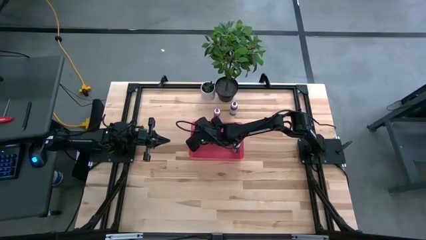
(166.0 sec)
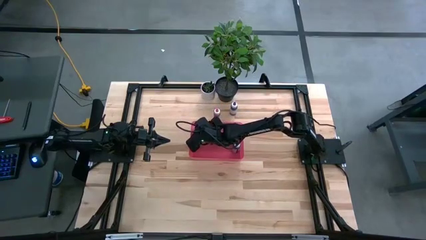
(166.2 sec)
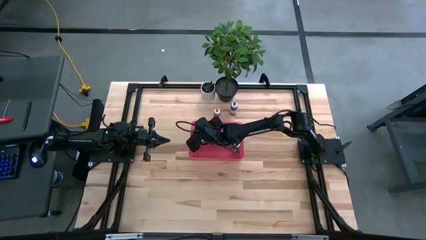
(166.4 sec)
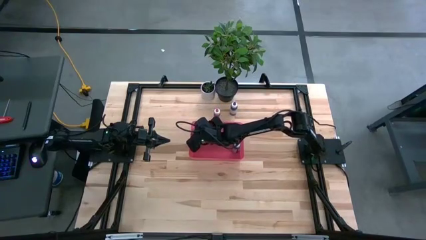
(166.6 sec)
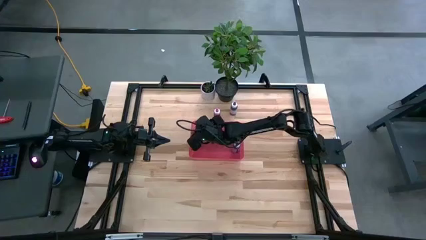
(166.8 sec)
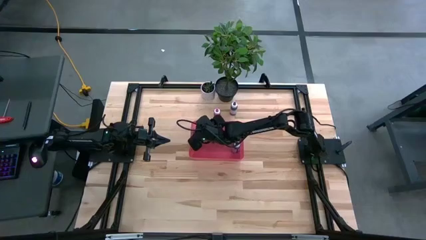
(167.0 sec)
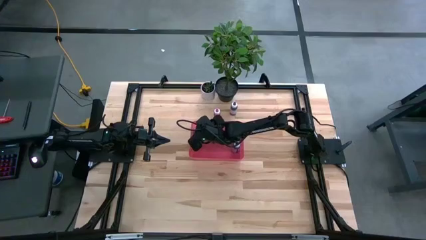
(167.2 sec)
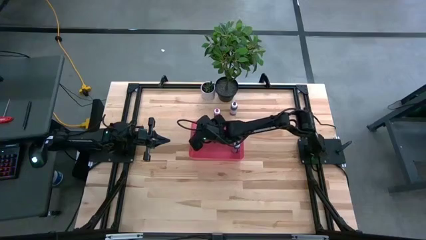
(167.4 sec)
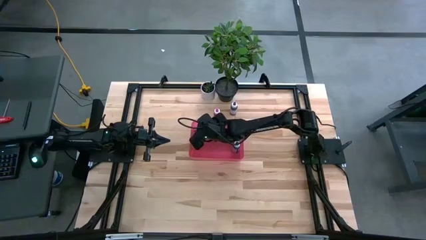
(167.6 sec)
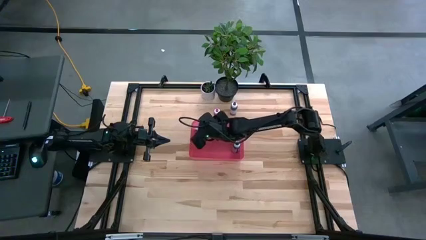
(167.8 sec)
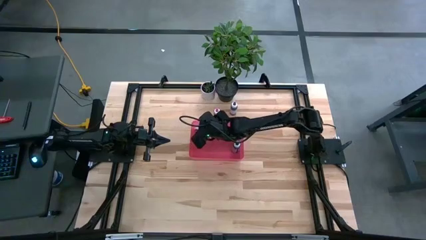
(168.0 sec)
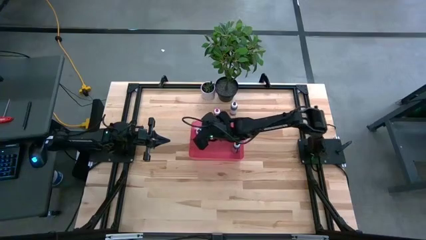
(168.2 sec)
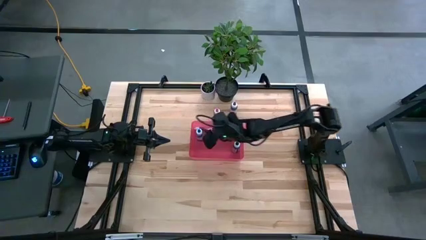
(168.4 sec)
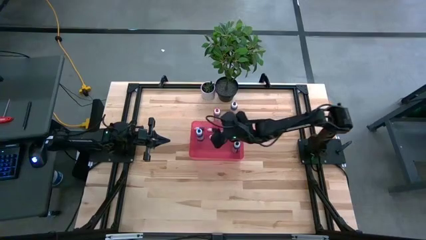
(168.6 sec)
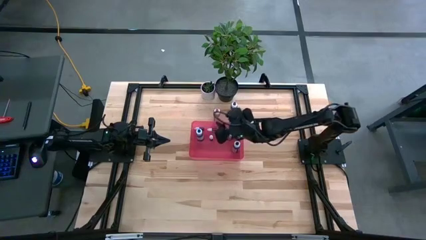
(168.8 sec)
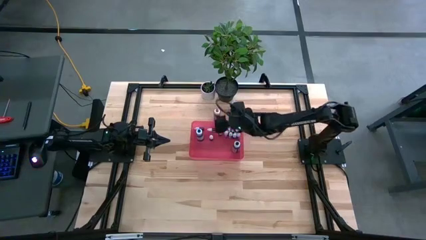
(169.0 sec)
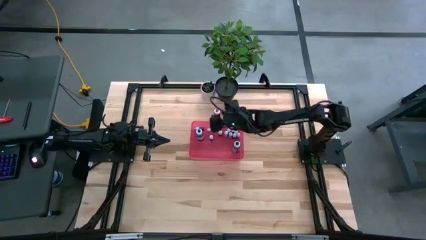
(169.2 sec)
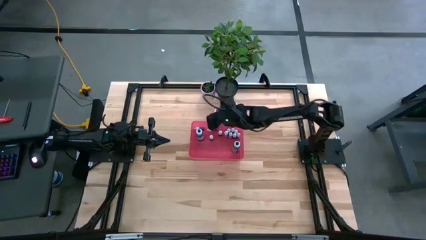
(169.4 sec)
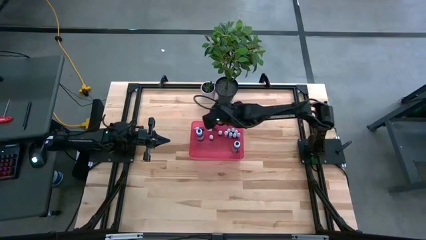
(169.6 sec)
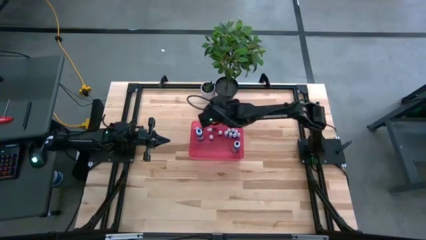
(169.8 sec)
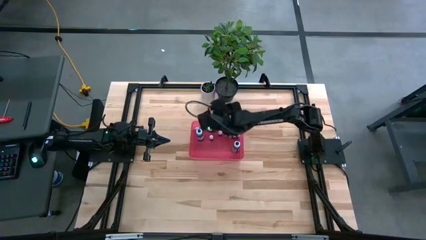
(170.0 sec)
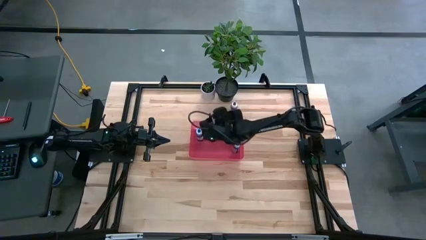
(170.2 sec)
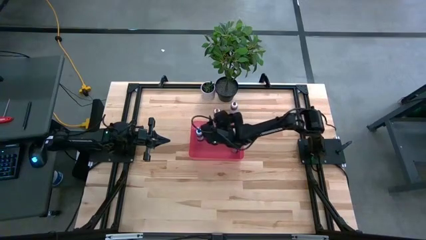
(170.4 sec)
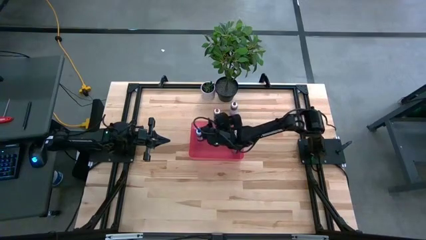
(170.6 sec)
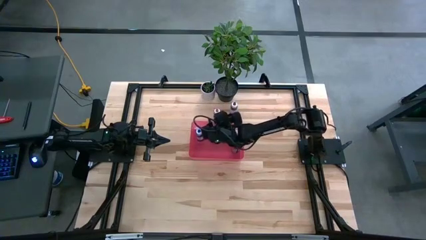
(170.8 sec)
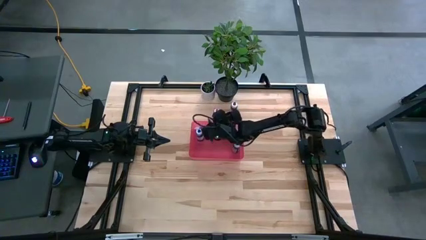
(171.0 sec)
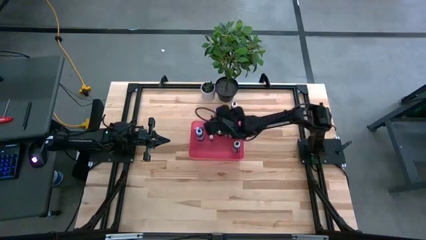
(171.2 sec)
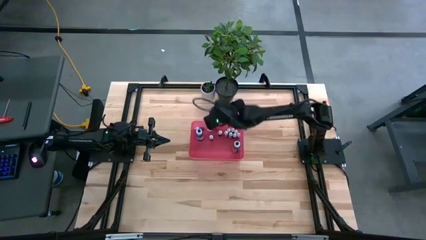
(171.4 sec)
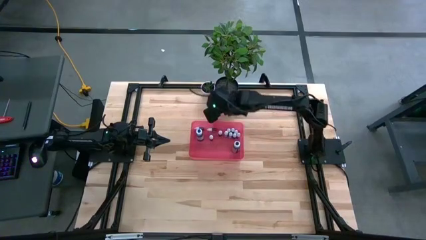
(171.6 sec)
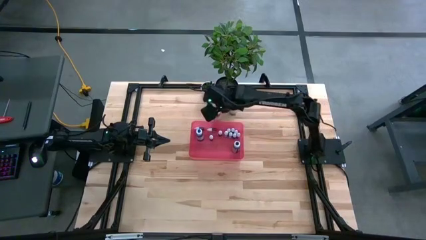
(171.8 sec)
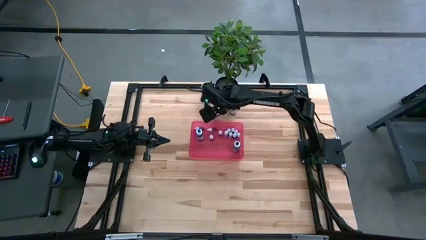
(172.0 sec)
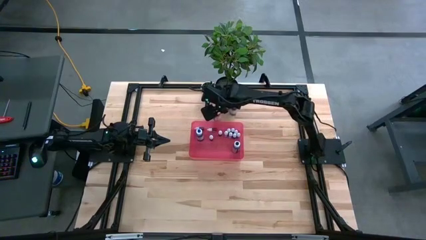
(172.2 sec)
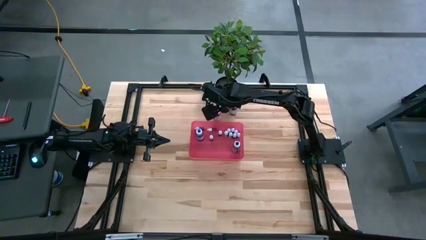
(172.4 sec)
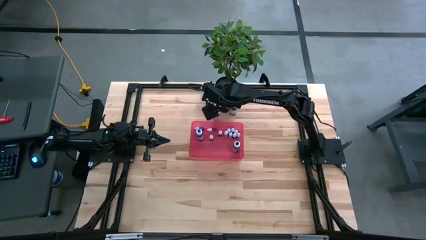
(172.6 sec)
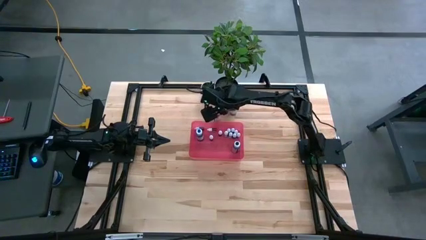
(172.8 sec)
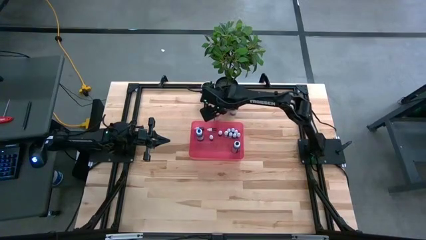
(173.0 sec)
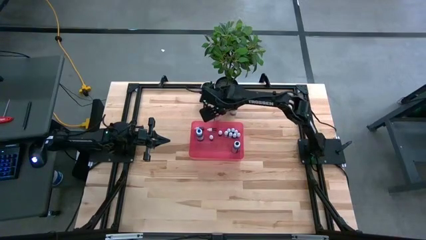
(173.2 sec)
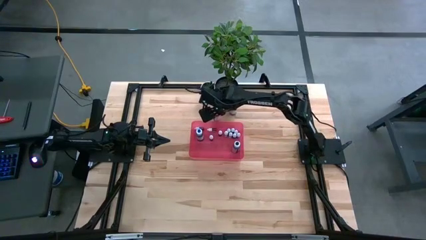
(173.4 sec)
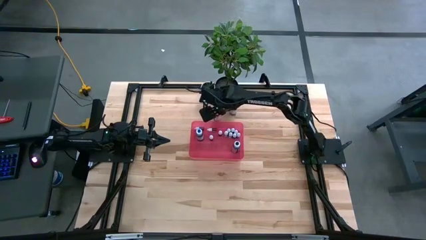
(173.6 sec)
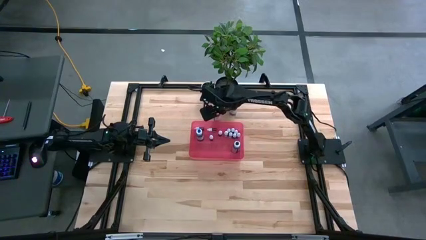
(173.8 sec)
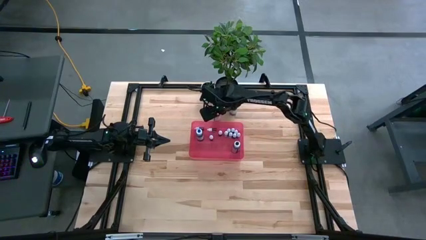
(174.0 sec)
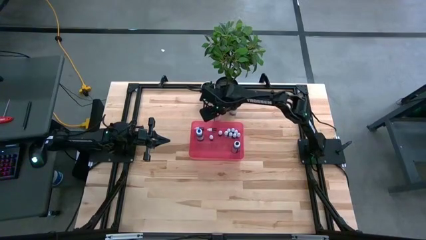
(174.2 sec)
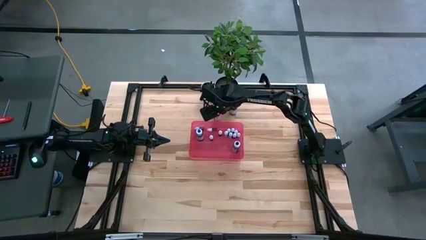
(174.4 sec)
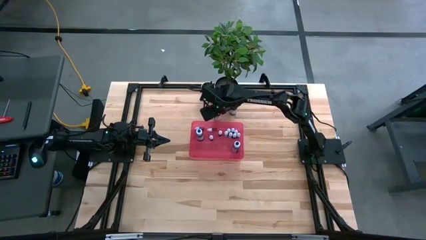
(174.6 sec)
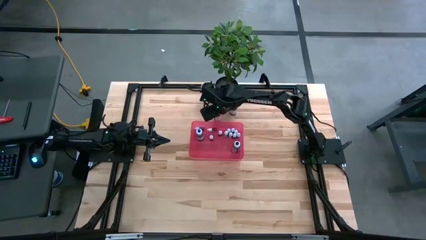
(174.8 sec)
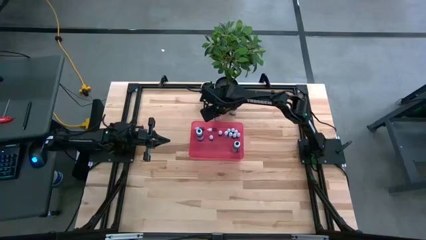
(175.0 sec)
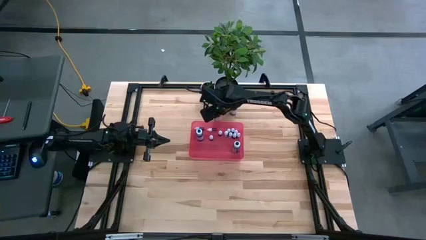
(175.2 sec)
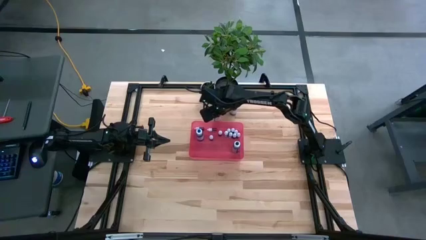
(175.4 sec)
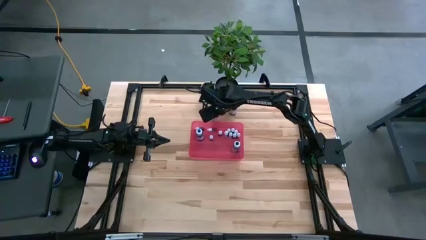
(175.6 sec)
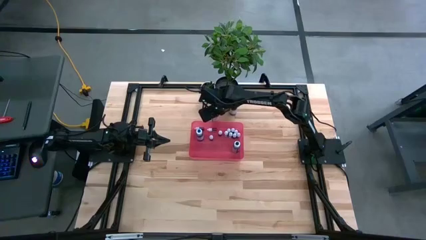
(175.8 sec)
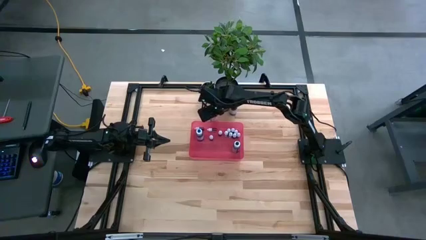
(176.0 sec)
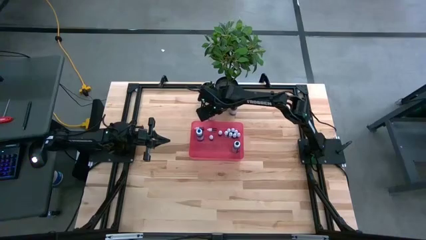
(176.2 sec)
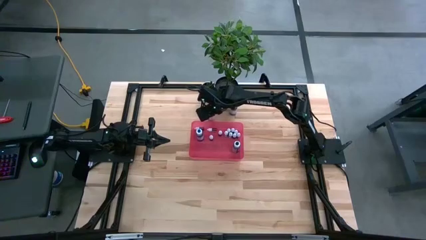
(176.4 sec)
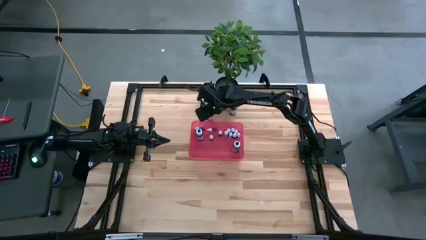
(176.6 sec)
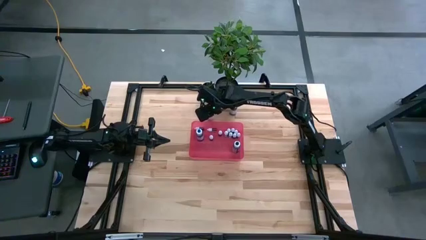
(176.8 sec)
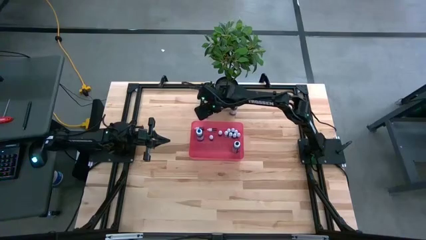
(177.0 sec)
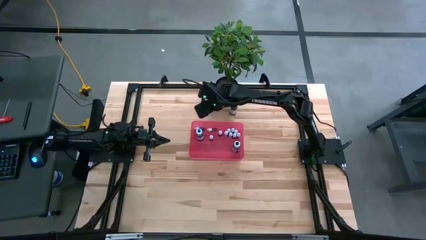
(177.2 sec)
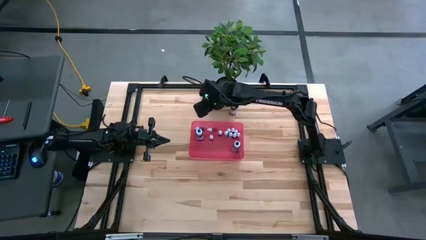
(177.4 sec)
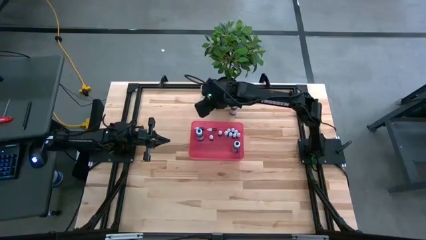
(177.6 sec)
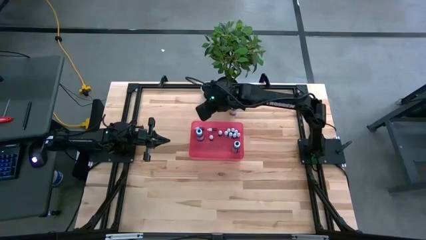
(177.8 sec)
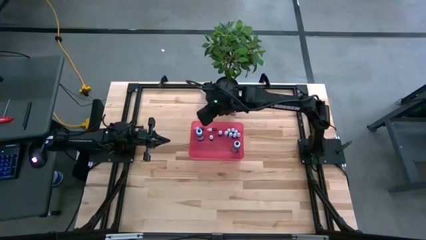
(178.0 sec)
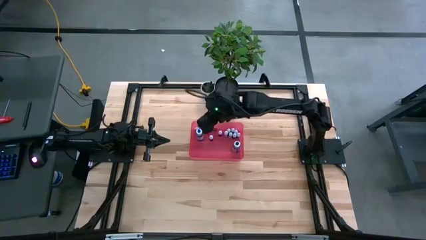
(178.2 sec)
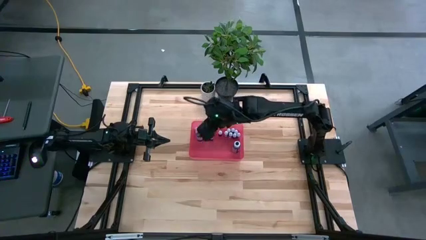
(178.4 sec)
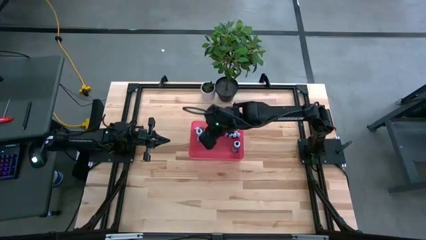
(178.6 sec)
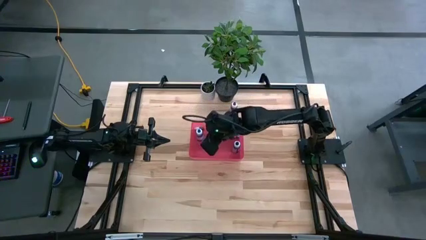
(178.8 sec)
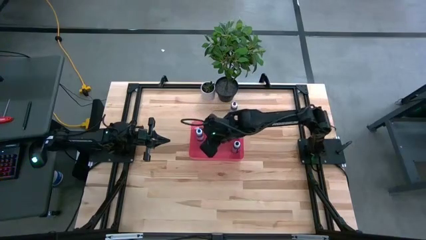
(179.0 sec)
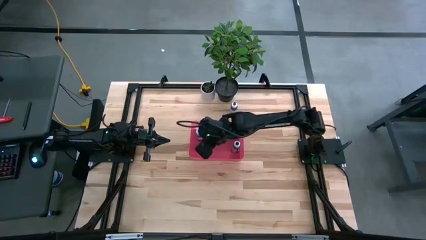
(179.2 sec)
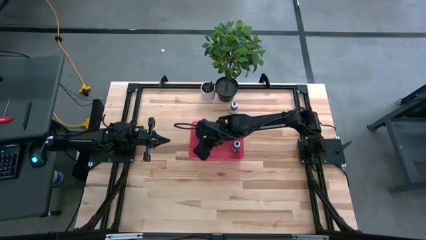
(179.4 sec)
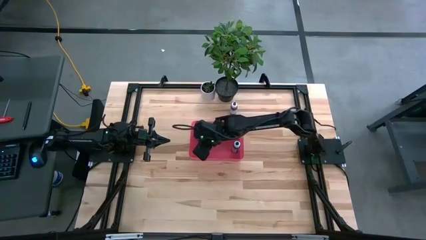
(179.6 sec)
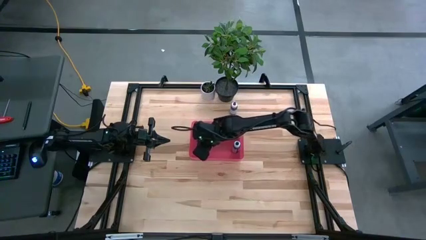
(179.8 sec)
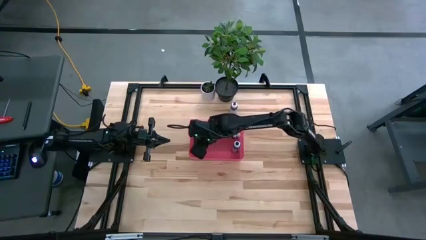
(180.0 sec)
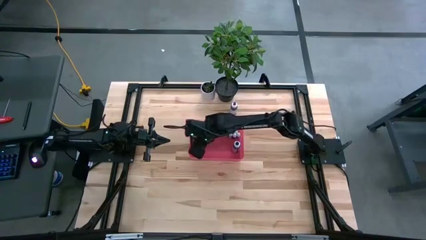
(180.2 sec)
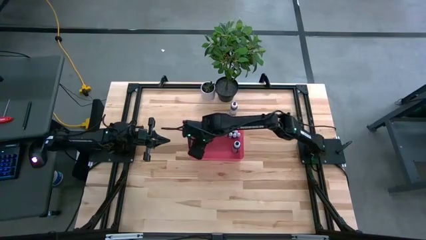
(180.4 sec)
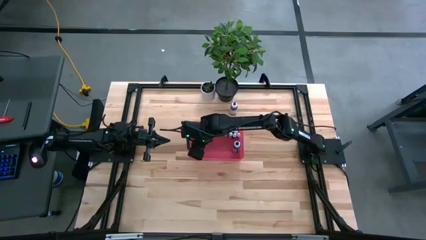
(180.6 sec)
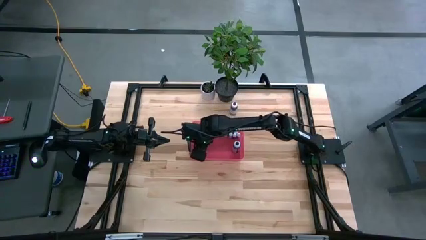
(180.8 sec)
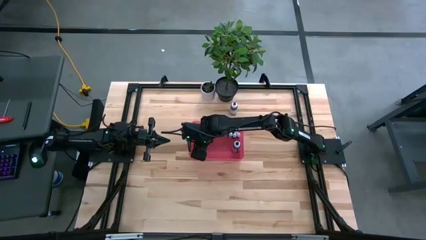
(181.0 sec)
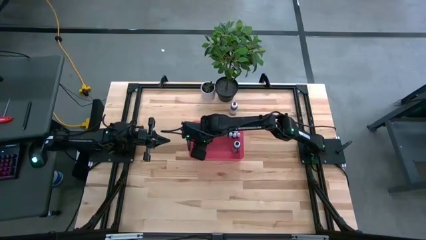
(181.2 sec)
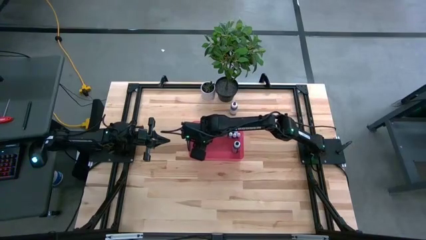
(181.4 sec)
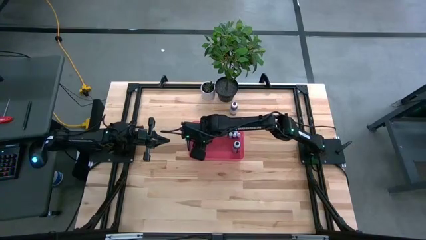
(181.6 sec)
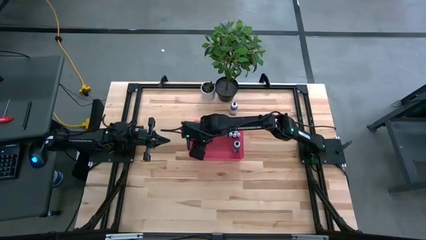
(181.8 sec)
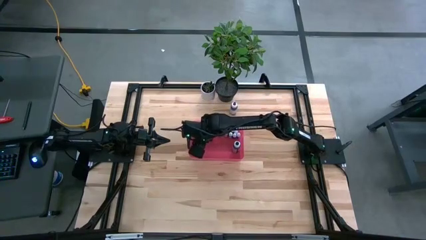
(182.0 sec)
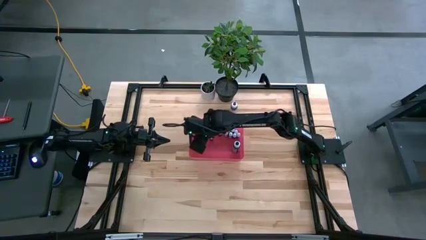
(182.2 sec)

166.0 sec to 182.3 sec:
Task: Pick & Place food coloring
Put the large pink food coloring bottle into the pink container
